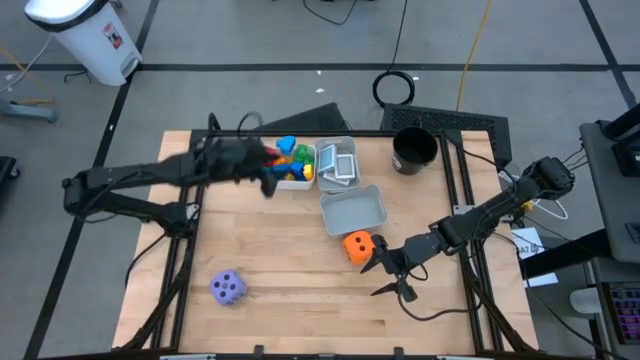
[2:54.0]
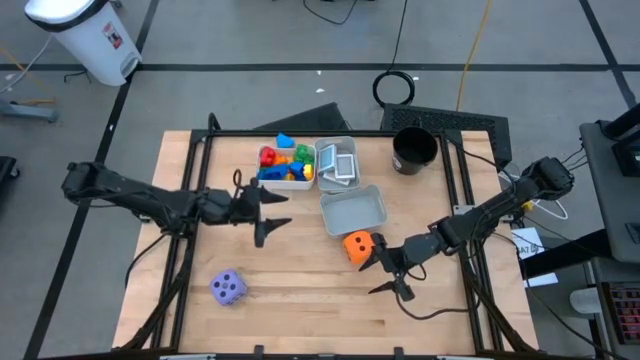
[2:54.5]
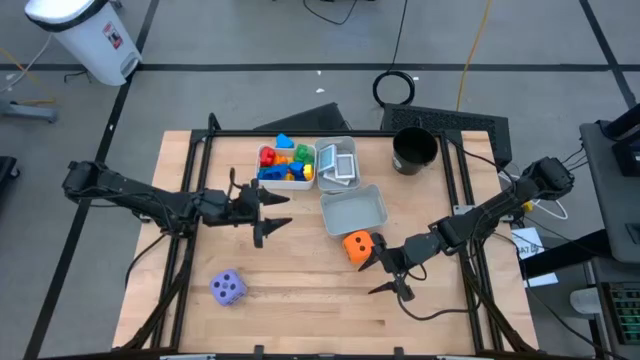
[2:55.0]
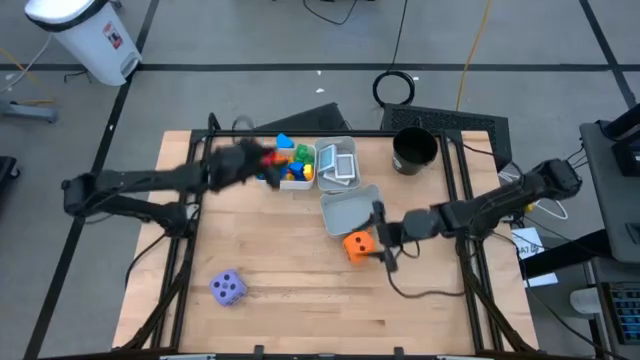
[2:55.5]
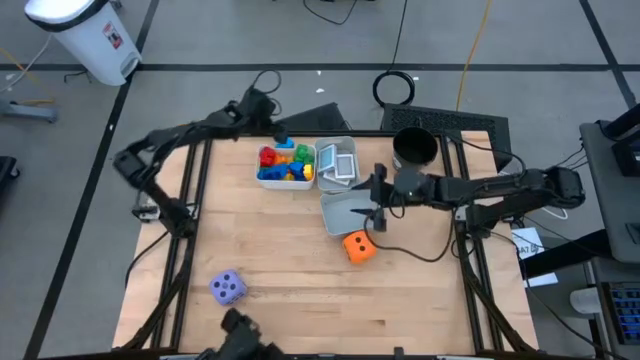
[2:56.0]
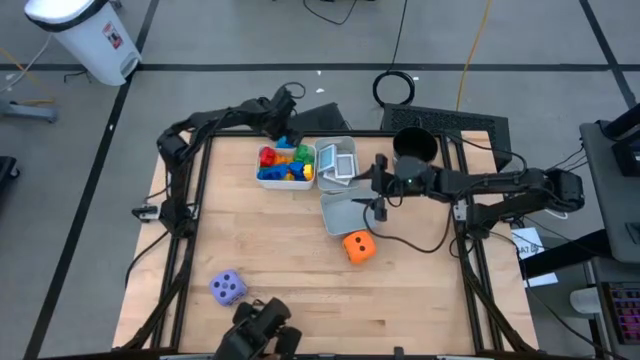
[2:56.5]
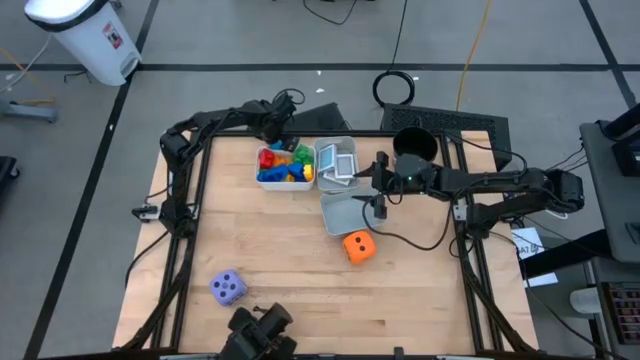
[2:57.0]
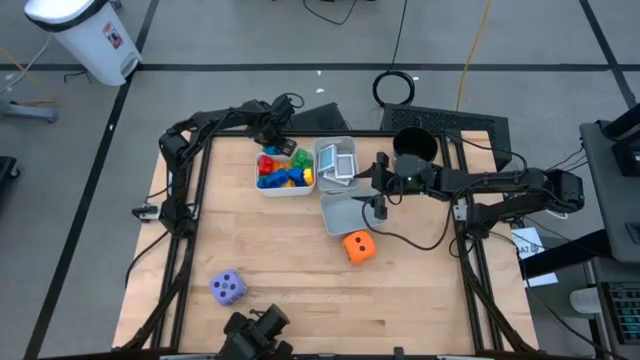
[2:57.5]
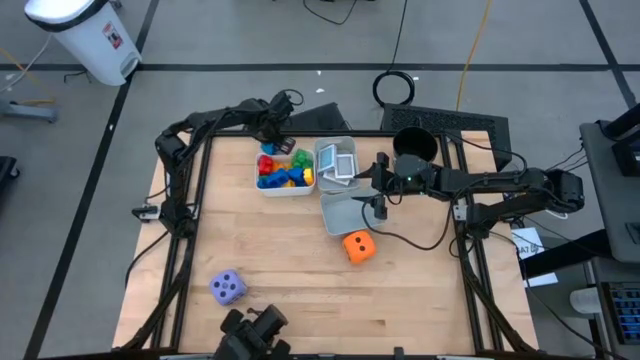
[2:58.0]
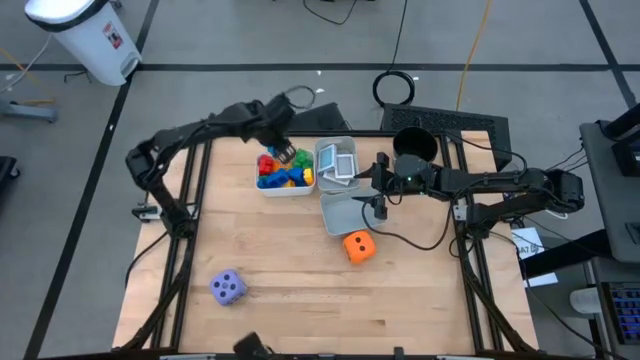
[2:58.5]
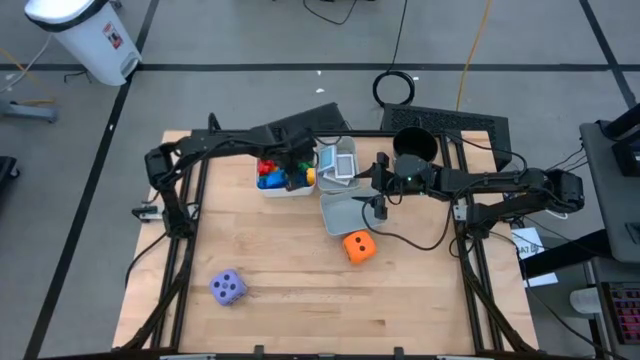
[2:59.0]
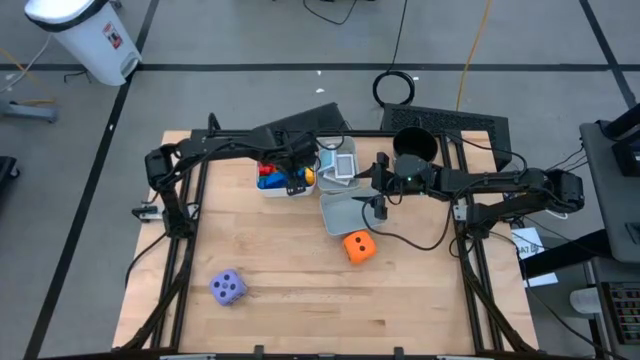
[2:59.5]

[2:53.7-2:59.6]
Task: Pick & Place Toys
Put the blue game piece into the white bin

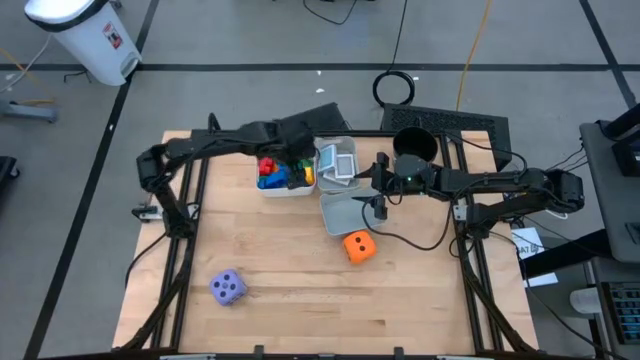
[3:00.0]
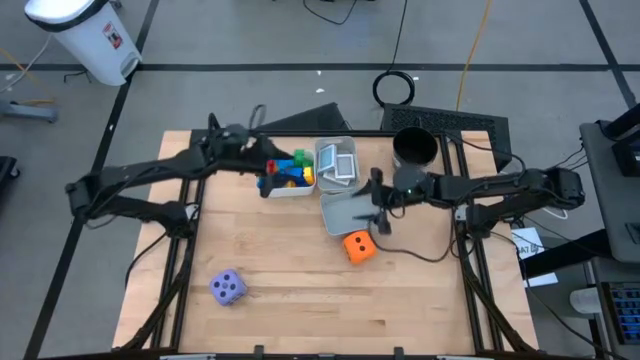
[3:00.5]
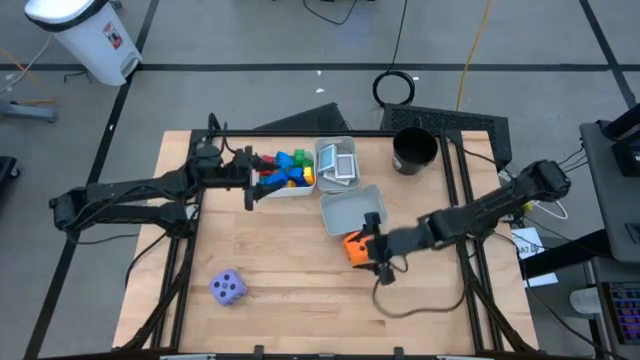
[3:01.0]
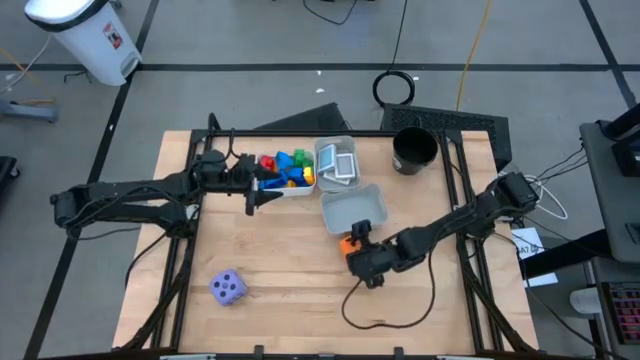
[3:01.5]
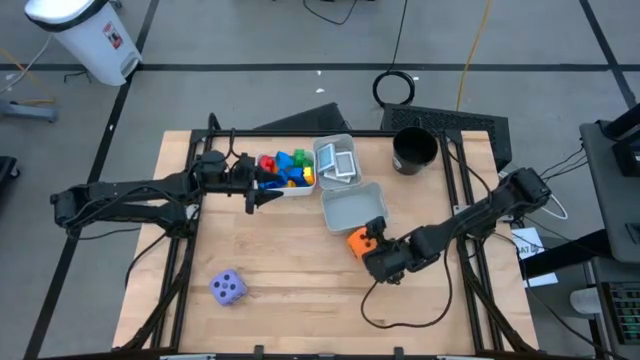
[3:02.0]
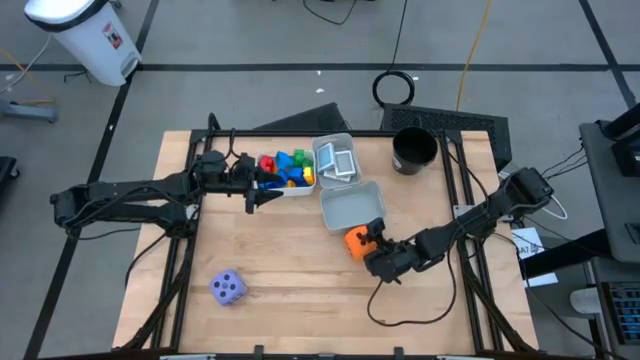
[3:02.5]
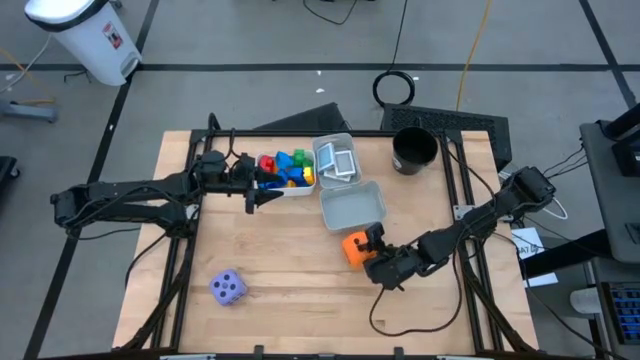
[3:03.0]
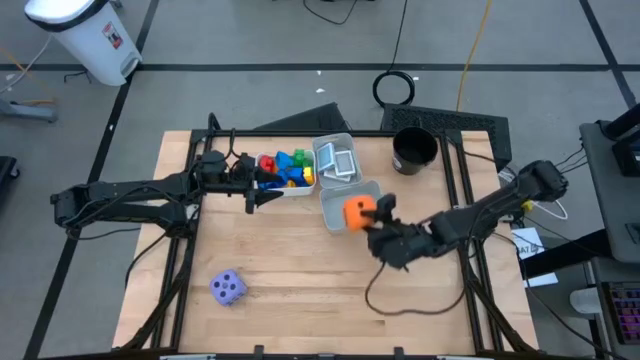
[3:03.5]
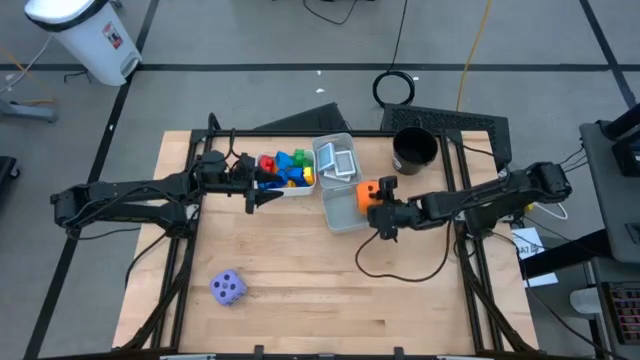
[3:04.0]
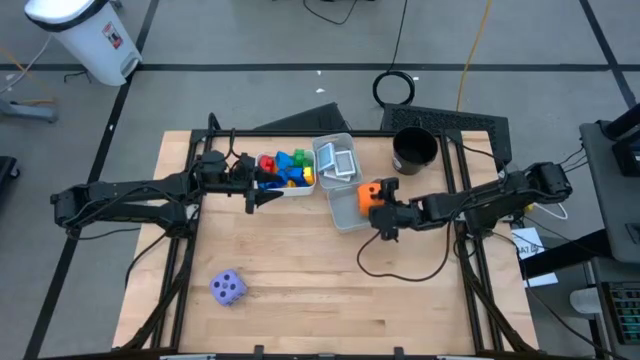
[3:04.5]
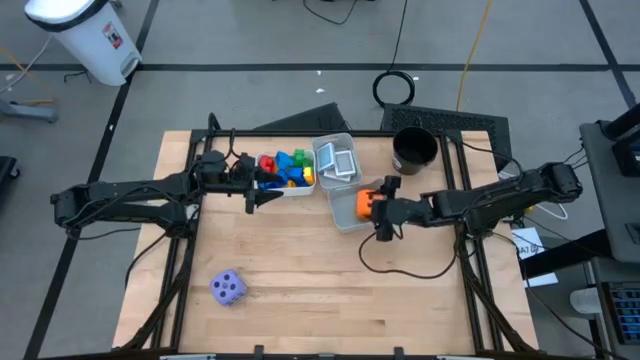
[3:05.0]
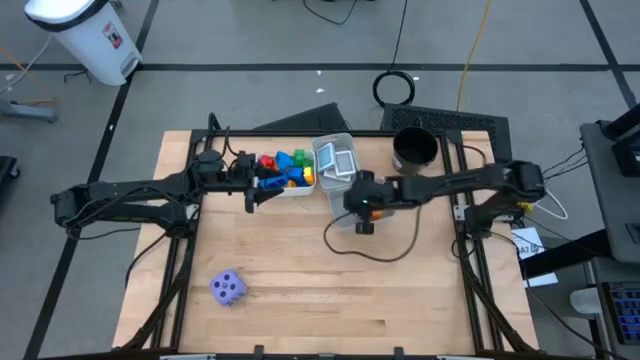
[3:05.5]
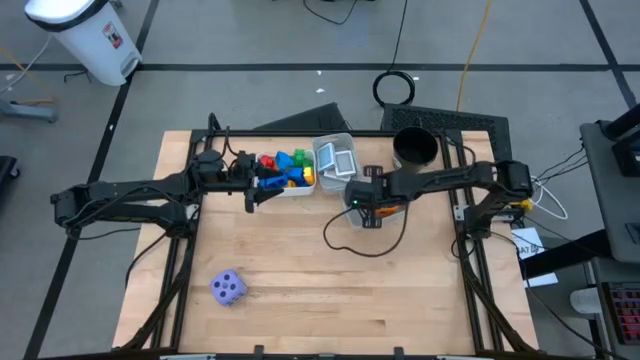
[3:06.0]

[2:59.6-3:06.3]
Put the orange dice into the bottom gray bin

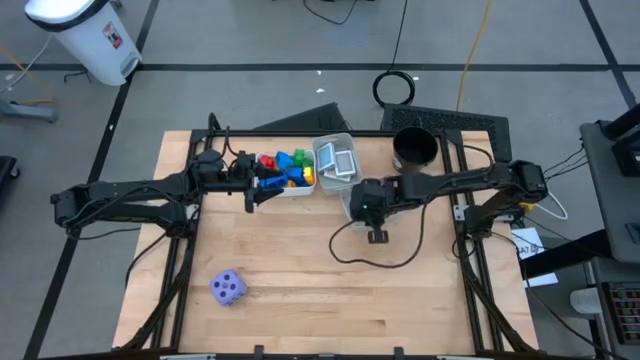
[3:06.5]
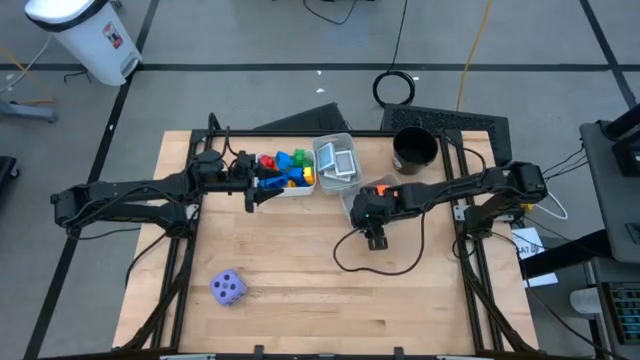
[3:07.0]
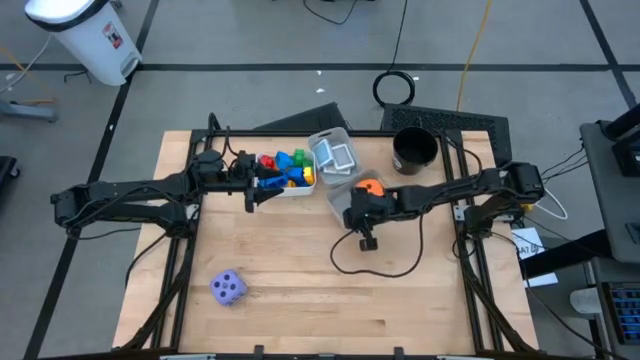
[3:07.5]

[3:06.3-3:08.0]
Adjust the gray bin

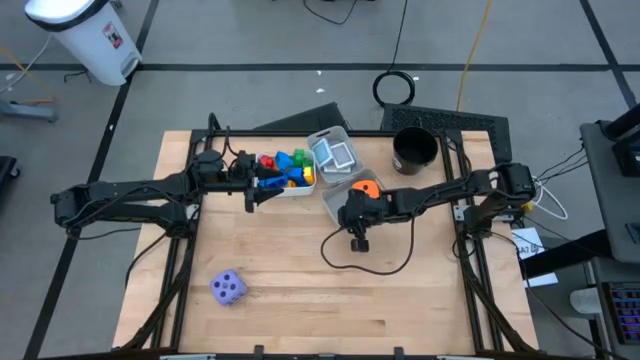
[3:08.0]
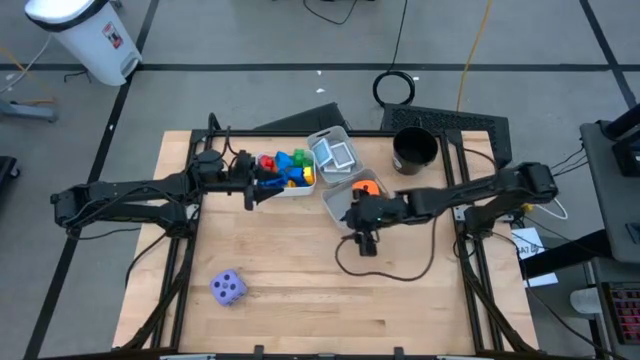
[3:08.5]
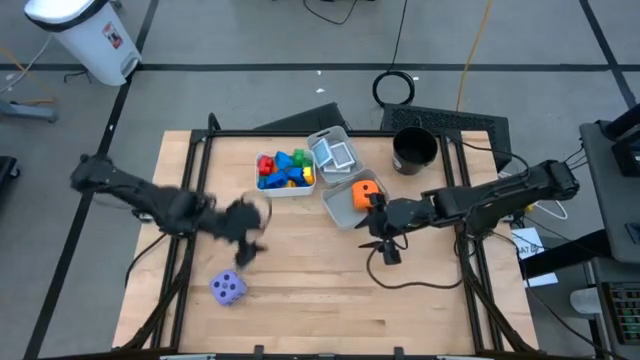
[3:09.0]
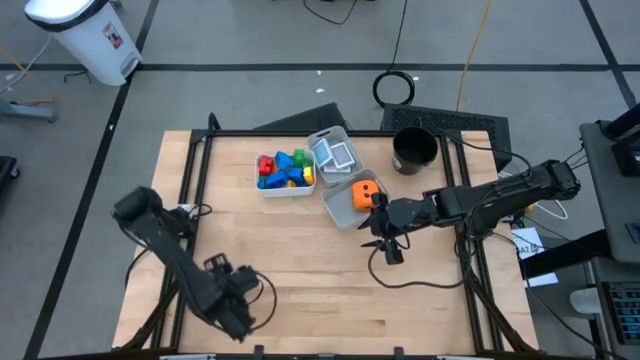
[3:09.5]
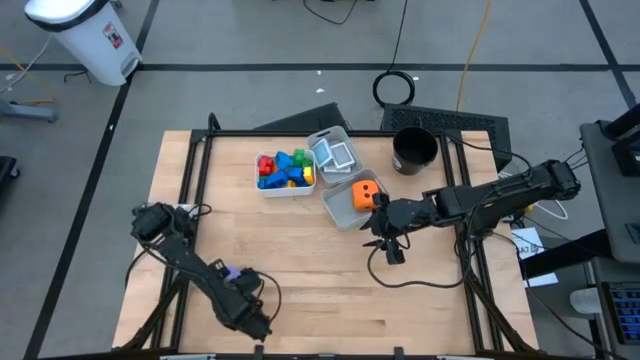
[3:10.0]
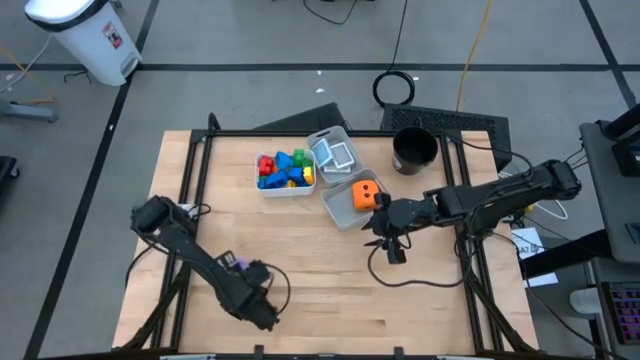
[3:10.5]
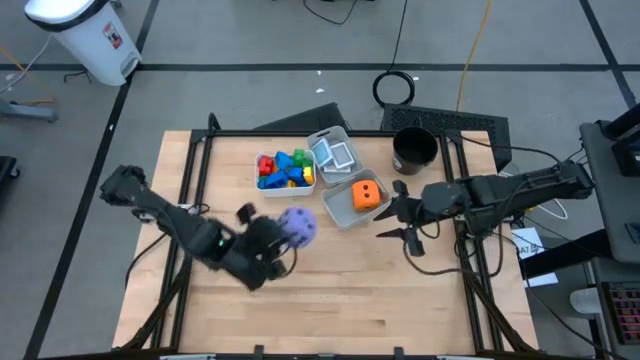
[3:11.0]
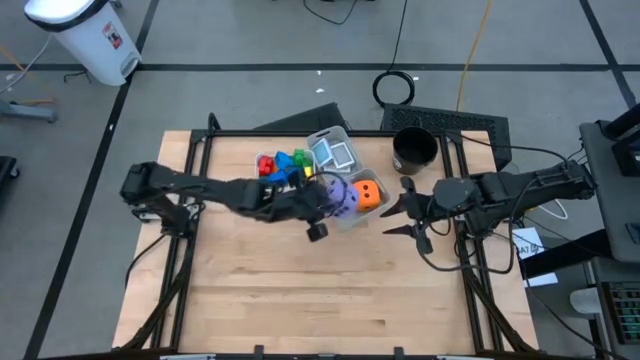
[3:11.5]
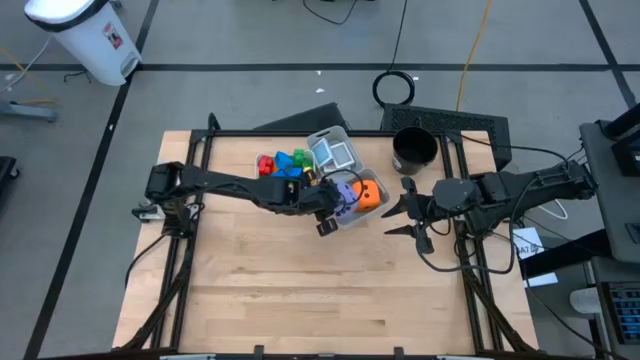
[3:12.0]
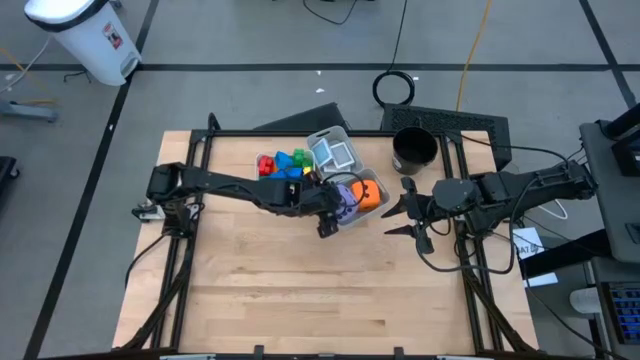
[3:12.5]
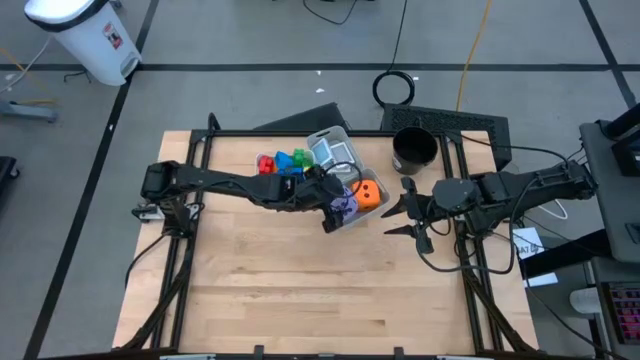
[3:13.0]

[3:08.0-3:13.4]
Put the purple dice into the bottom gray bin

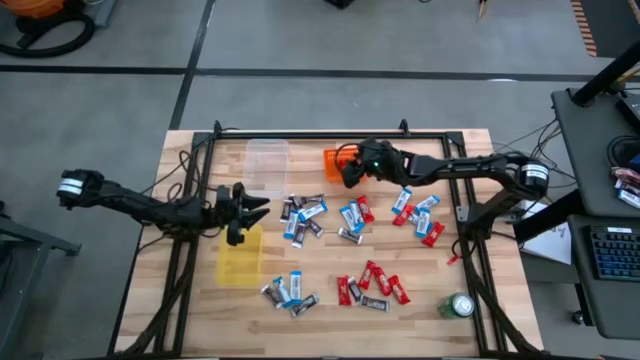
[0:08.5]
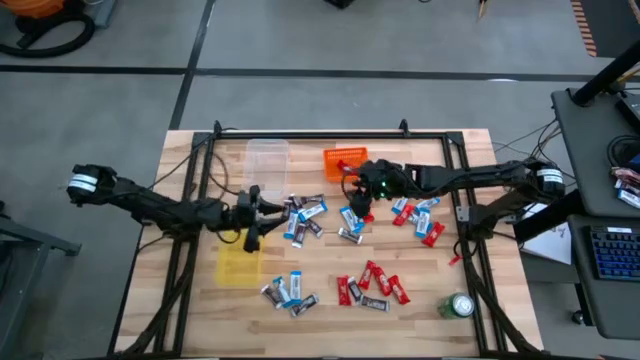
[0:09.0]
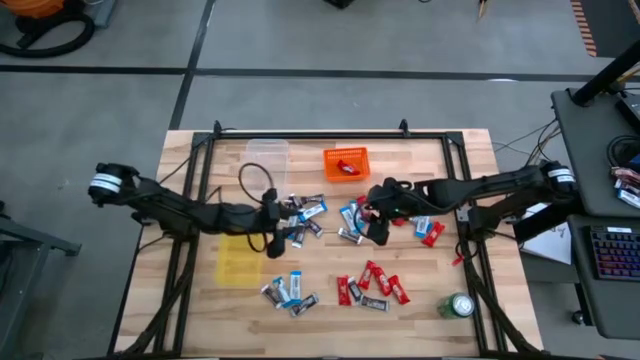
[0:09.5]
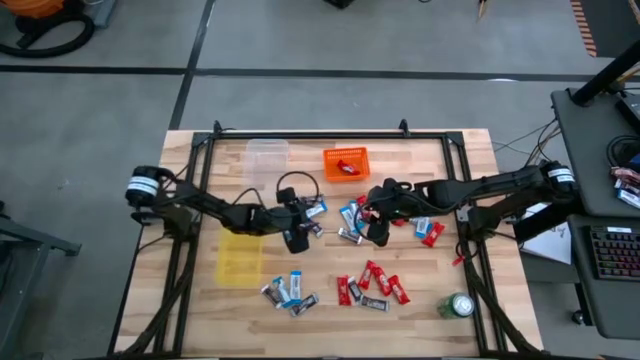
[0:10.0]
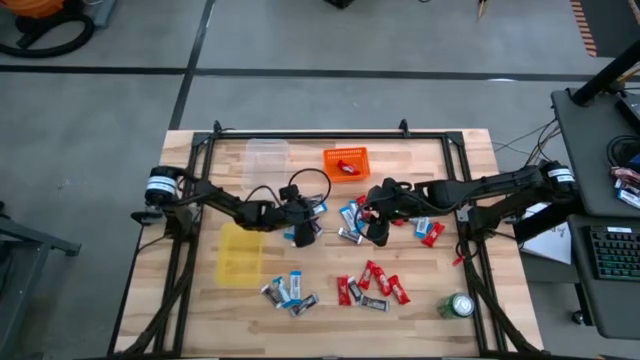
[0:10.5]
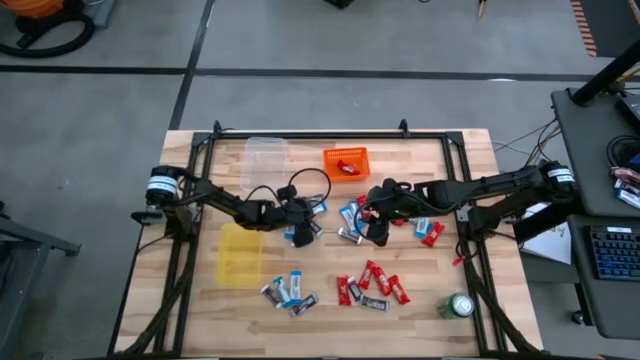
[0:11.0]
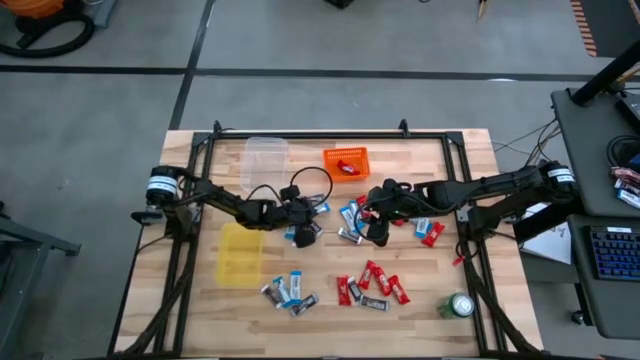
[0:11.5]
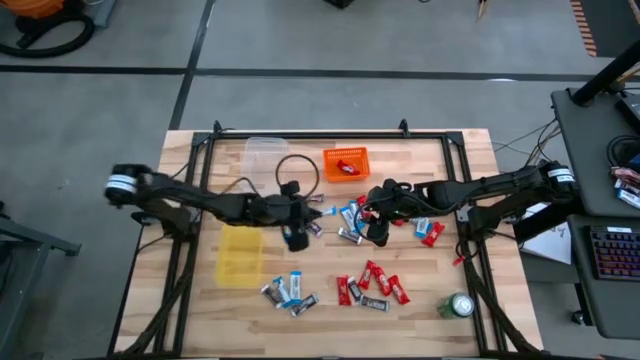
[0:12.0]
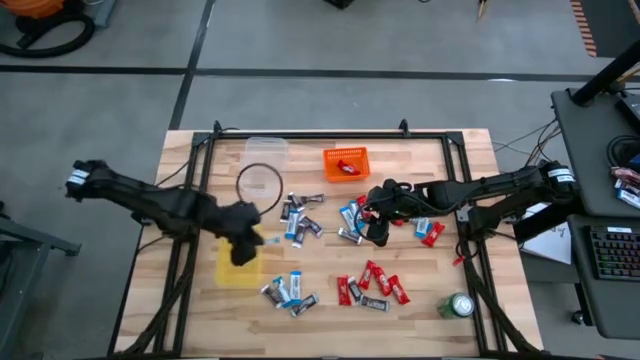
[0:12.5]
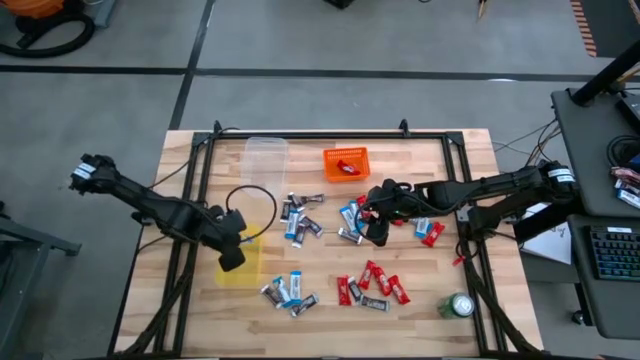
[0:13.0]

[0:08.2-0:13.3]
Task: Sort candy
Put the middle left white candy into the yellow bin
